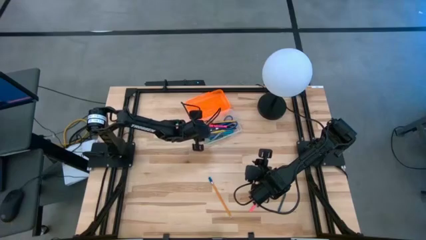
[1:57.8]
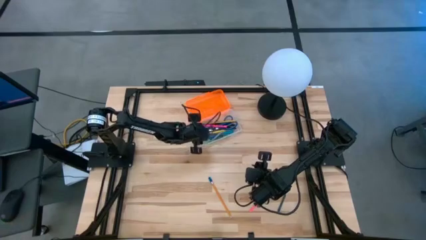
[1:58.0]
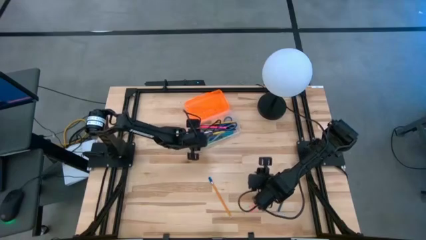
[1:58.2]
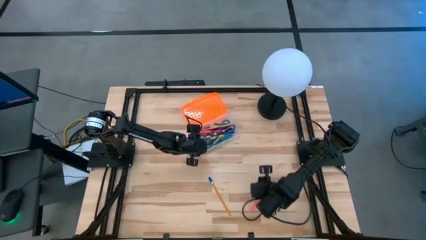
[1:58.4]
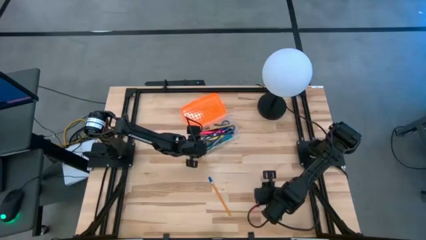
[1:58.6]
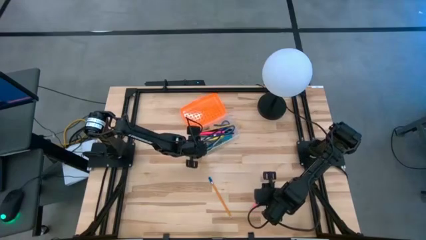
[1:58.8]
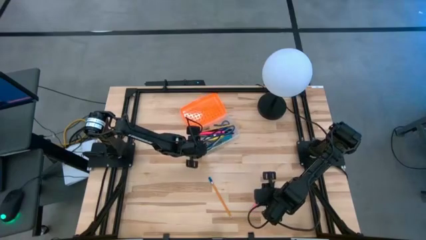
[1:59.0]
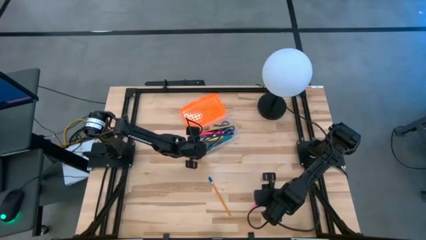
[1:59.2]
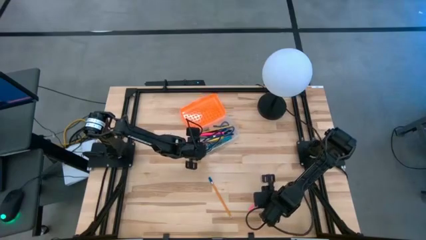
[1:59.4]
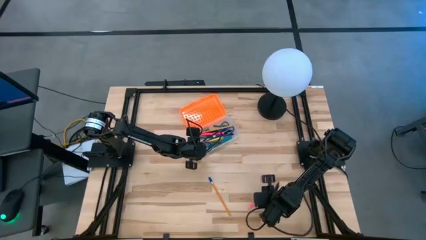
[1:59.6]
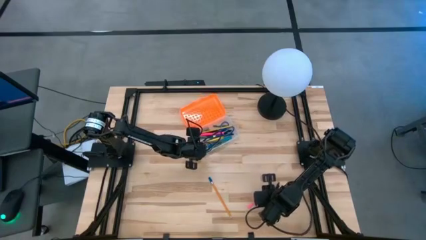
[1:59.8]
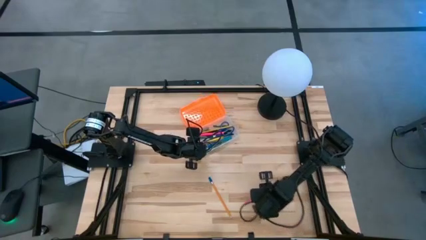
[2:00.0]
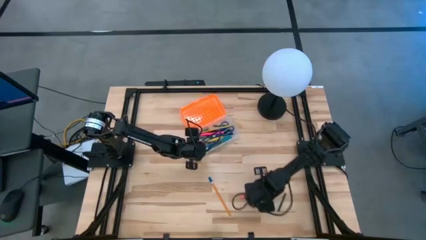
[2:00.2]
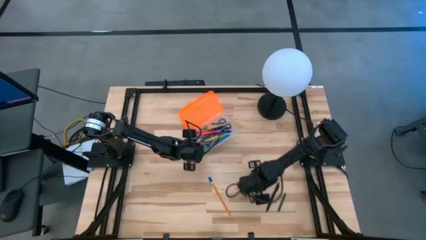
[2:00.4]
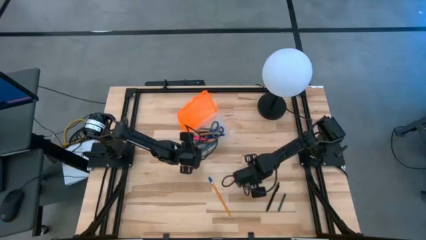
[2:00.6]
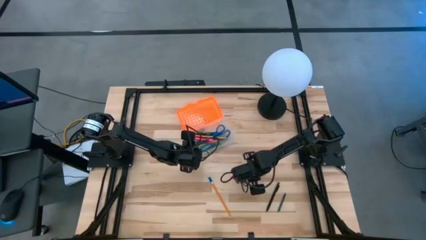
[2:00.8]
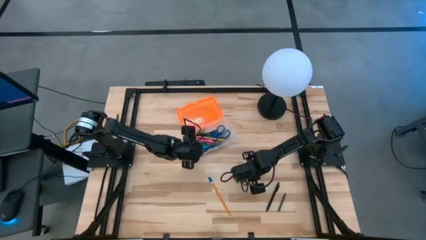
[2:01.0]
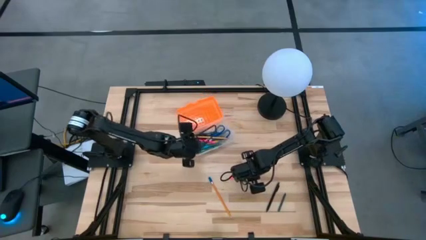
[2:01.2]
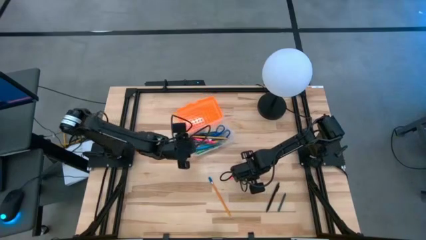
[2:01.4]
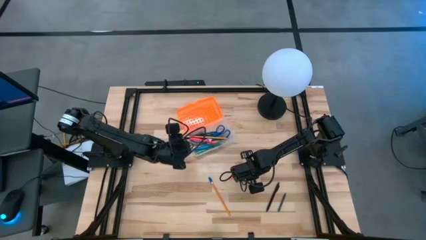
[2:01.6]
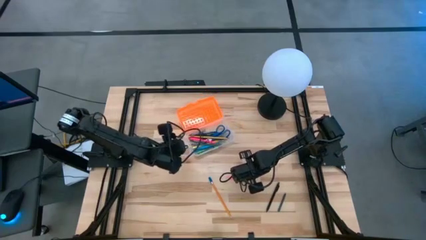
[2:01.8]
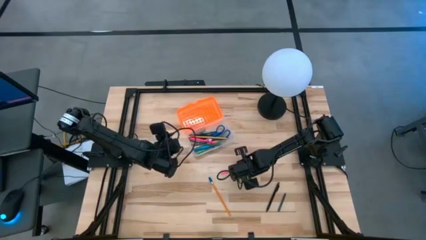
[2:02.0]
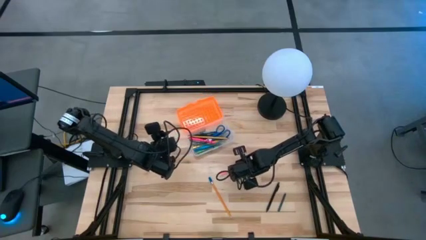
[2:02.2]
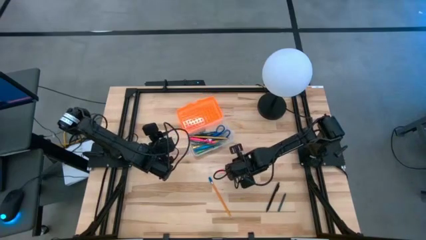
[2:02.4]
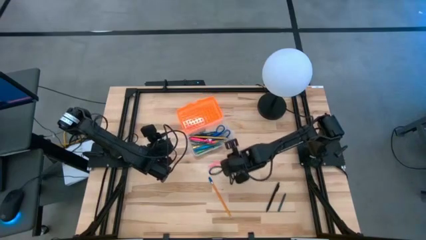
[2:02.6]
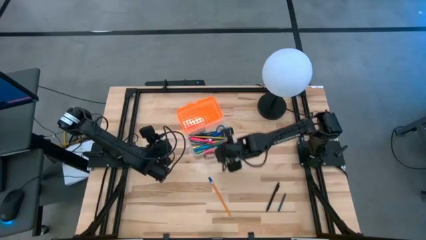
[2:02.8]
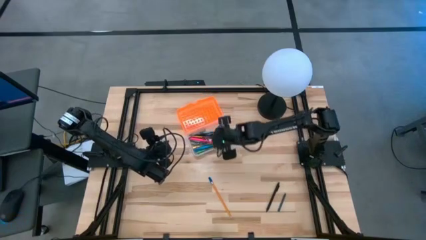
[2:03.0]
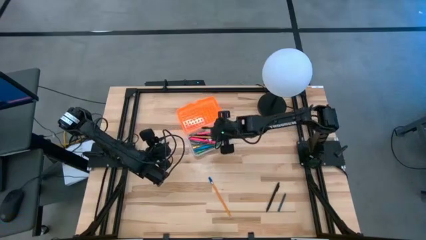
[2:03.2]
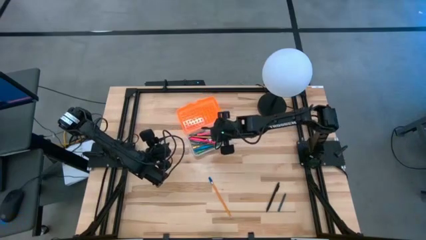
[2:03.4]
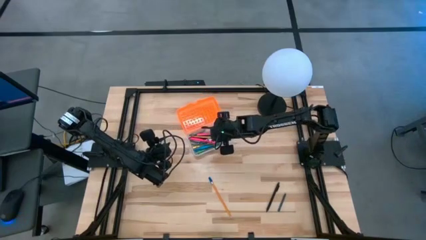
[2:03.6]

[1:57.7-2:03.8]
Task: Pick & place school supplies into a supply box
Put the pink pencil into the supply box

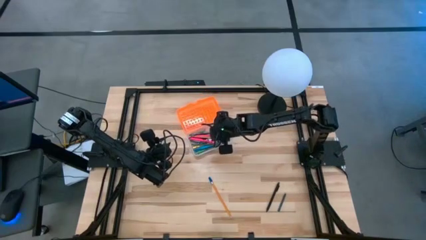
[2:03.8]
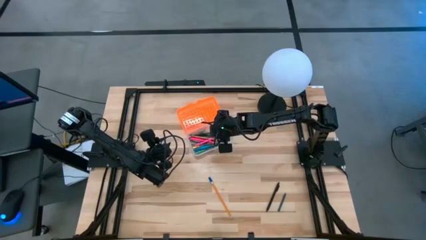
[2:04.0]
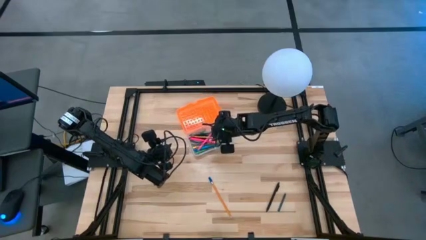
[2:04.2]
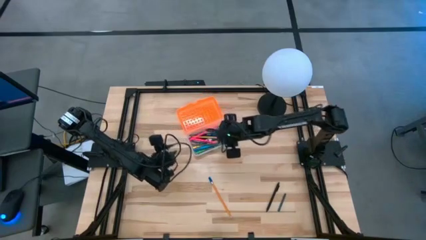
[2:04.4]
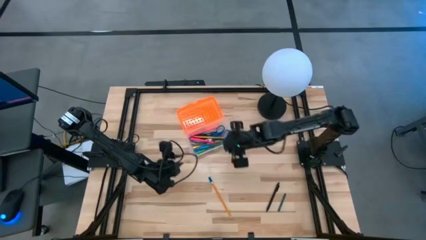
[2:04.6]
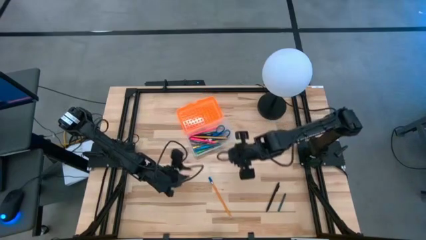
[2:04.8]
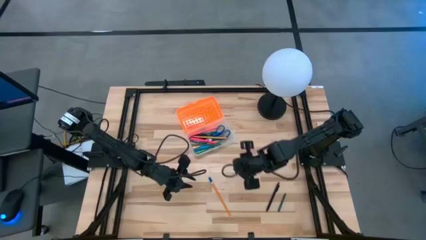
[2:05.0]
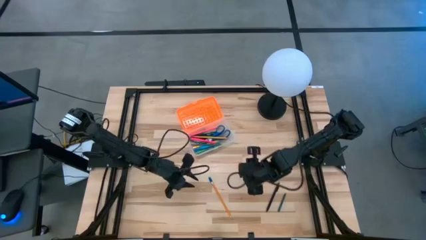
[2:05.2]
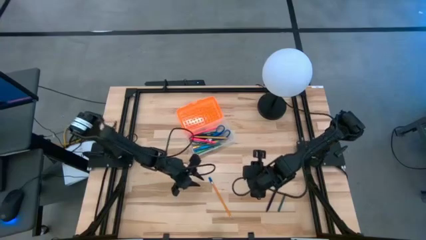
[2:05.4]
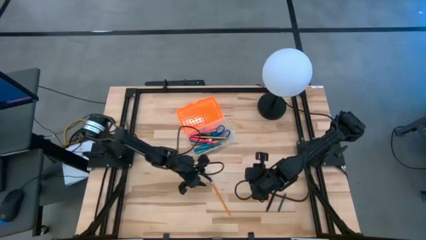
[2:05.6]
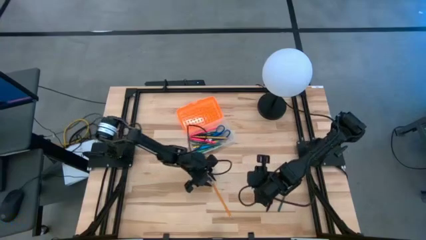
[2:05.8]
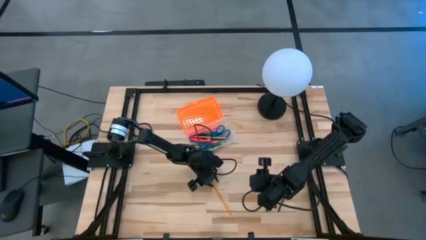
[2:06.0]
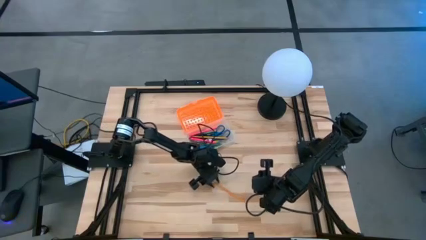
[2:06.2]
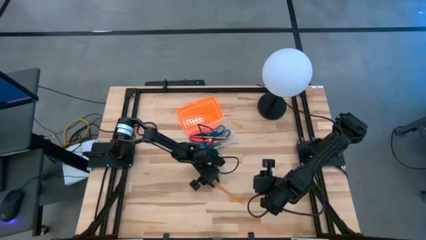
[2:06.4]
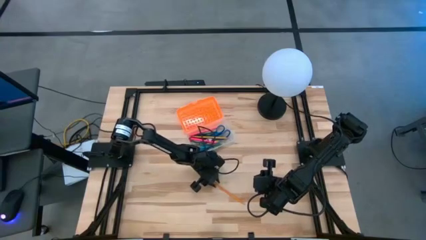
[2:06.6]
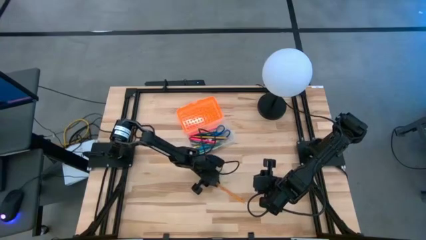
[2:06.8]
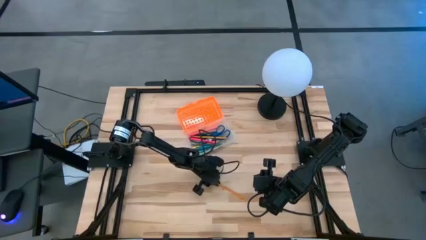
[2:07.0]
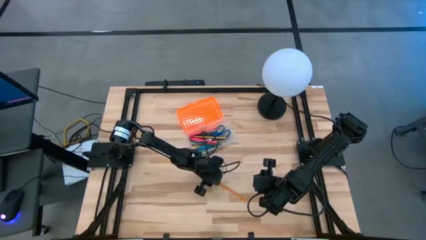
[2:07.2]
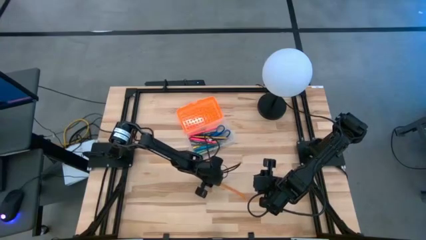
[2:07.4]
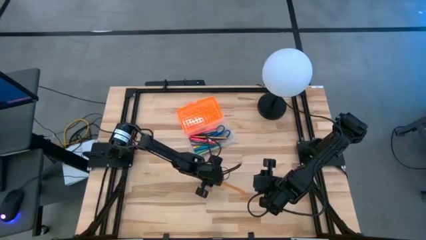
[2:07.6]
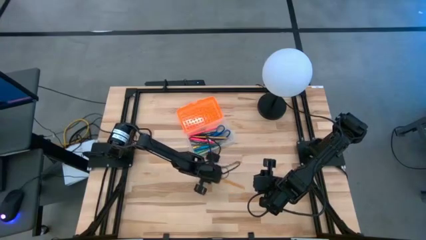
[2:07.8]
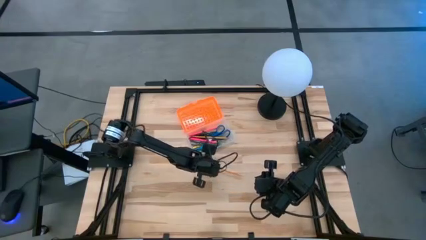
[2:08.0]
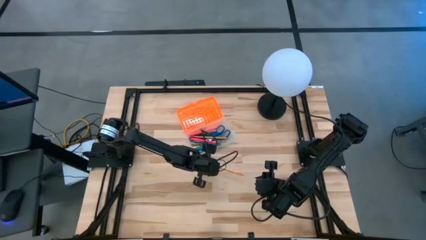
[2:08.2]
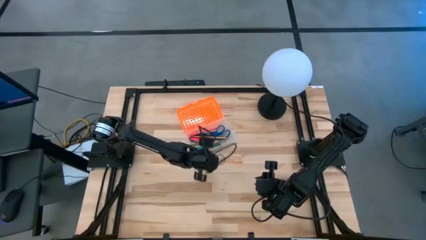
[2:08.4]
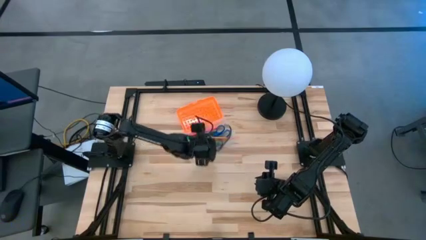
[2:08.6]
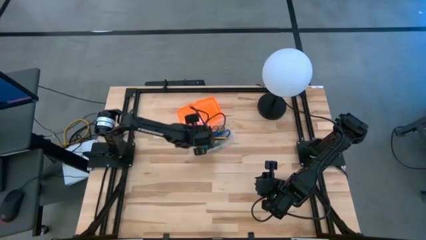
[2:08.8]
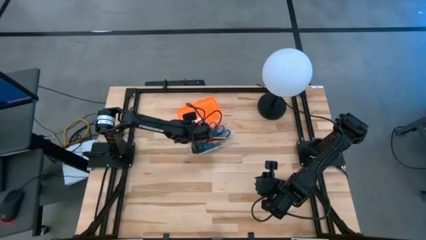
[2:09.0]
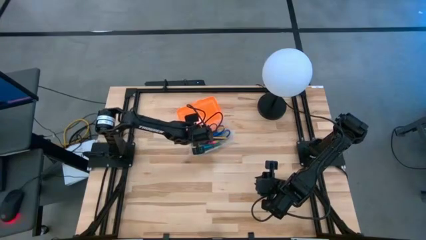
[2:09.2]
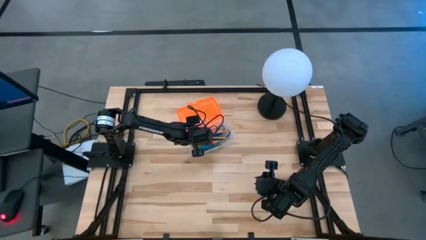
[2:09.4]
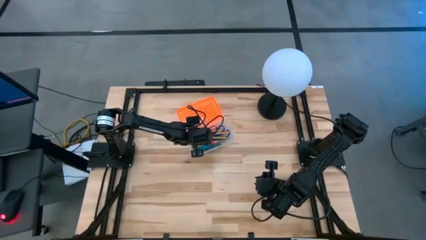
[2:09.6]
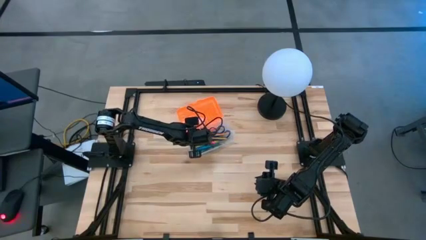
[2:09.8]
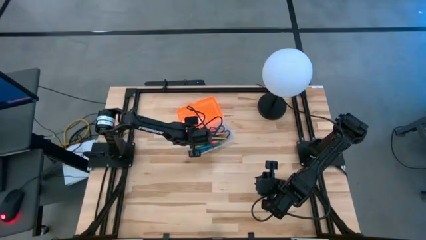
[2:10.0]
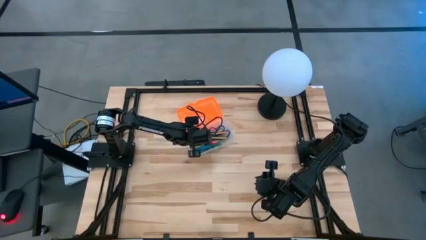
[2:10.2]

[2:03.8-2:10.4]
Put the orange pencil into the supply box

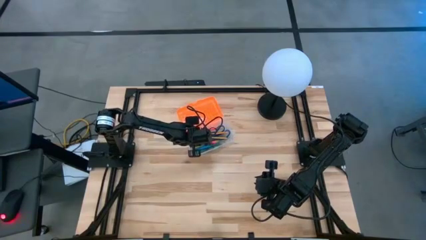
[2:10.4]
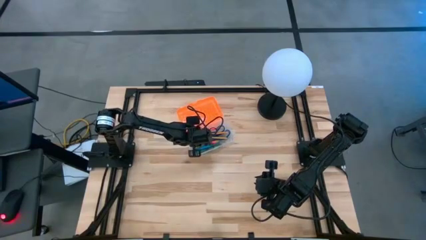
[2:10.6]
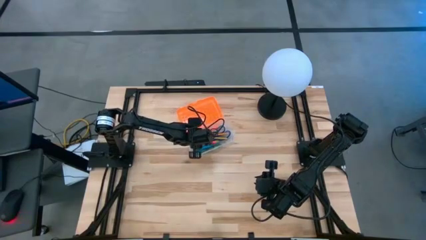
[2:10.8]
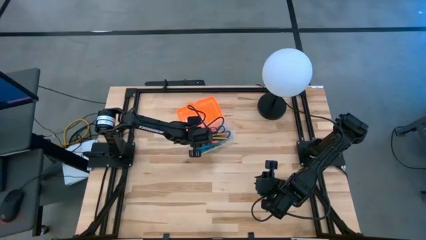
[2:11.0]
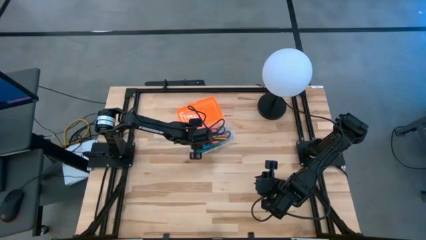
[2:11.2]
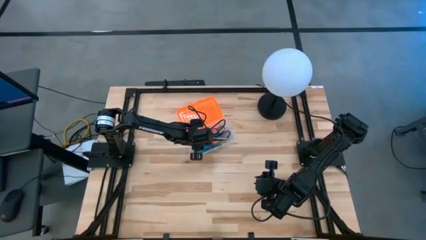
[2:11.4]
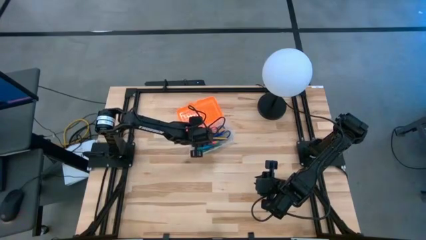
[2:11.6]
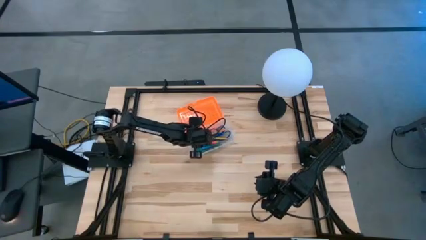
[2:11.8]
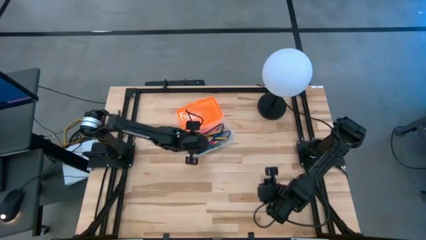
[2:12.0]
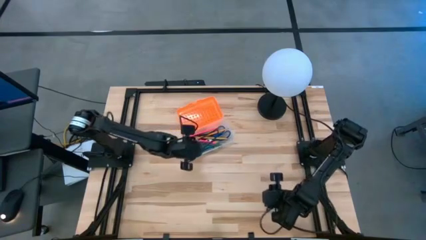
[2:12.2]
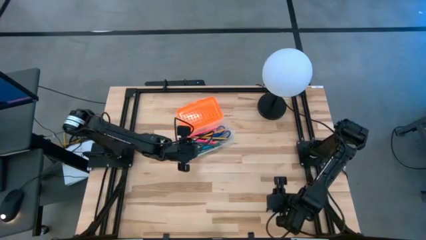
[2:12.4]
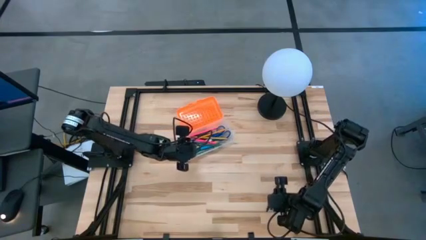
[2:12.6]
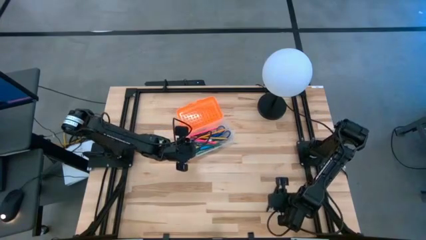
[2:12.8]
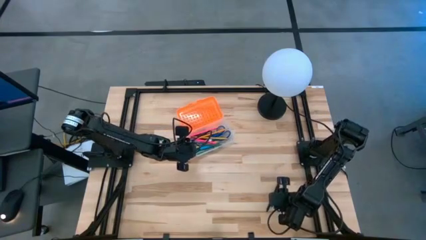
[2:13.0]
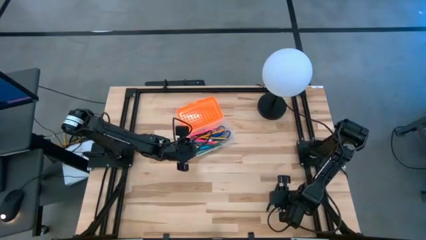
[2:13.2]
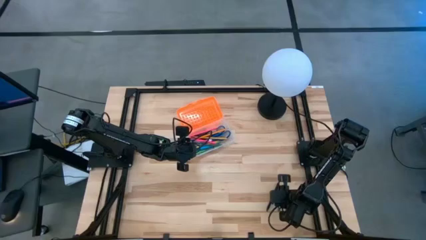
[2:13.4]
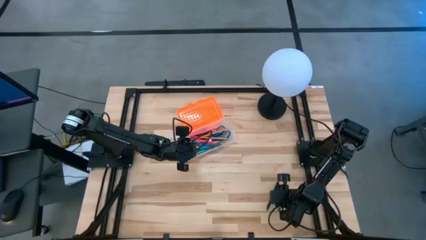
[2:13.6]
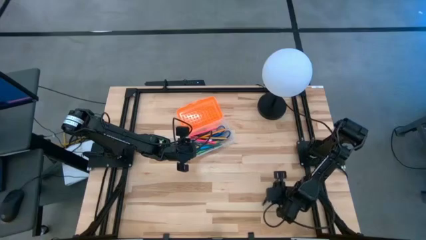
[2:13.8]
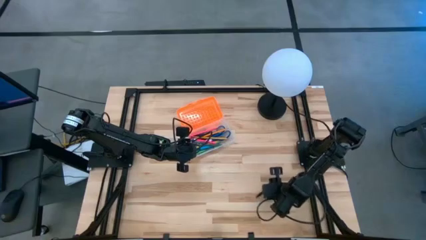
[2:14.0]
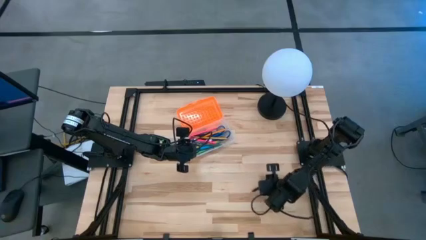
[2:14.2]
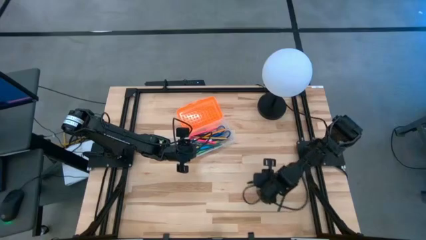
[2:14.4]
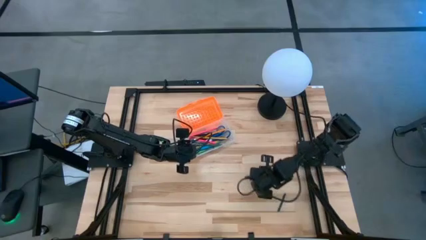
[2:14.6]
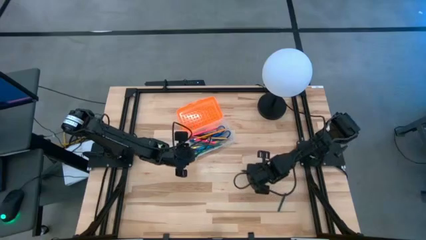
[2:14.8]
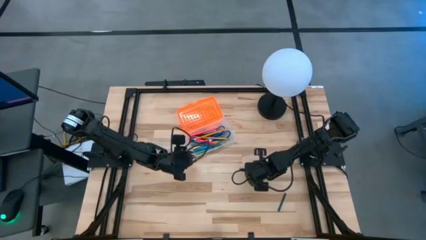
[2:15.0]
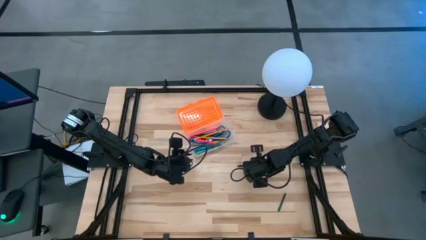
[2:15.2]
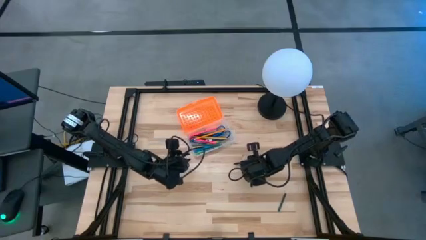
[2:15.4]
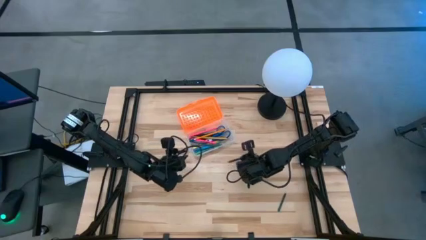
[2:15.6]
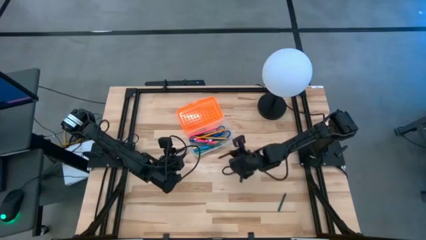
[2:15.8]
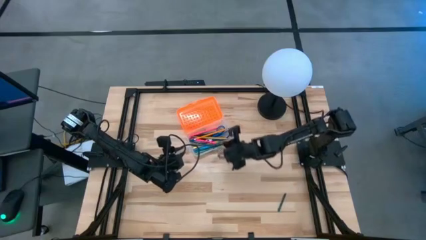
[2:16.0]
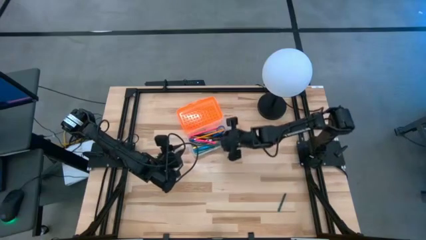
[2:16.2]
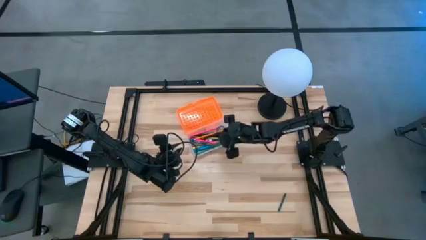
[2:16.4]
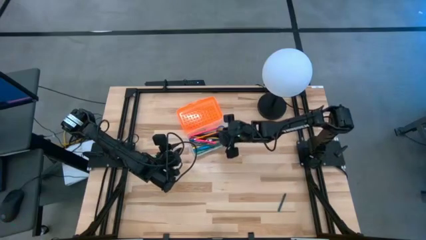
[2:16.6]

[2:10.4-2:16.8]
Put the black pen into the supply box
